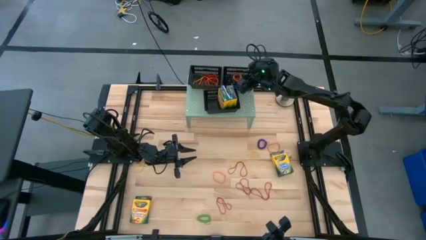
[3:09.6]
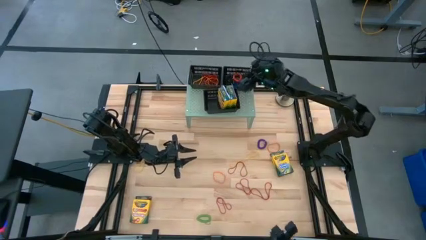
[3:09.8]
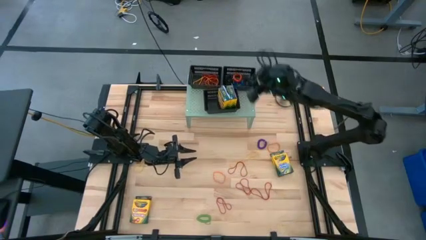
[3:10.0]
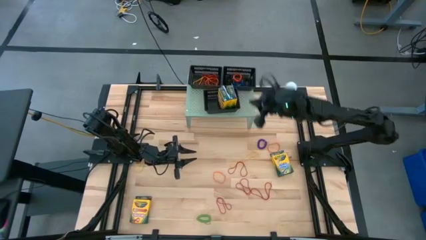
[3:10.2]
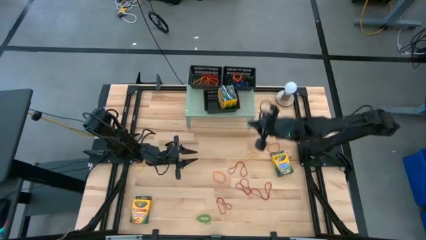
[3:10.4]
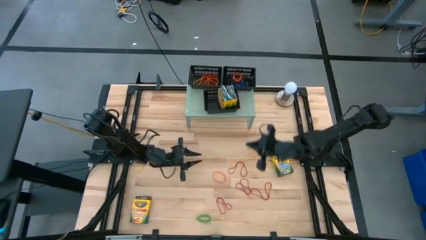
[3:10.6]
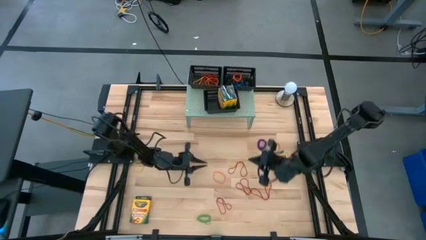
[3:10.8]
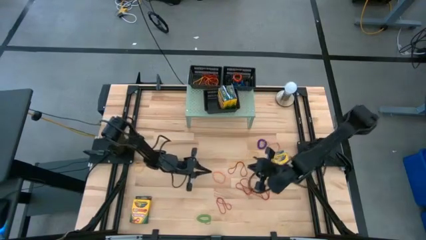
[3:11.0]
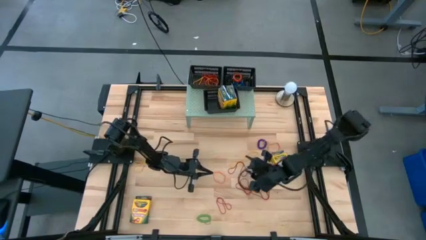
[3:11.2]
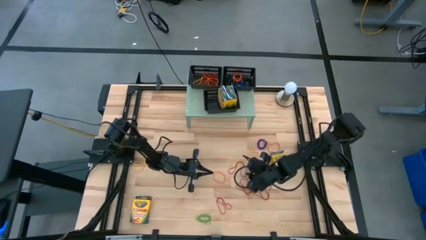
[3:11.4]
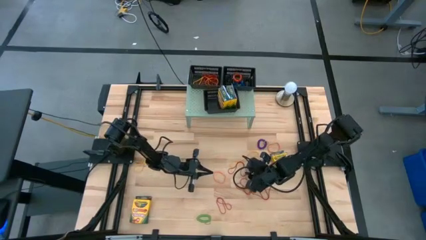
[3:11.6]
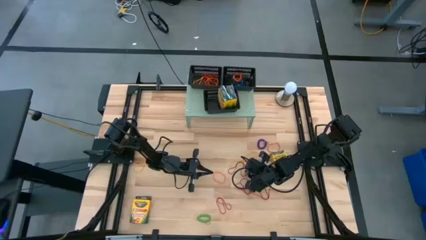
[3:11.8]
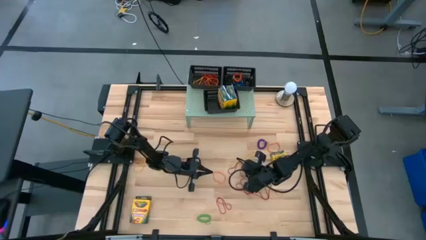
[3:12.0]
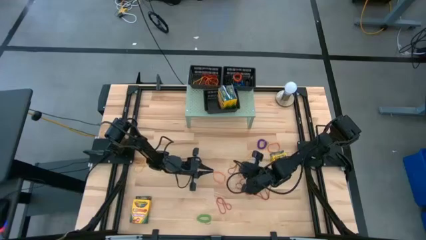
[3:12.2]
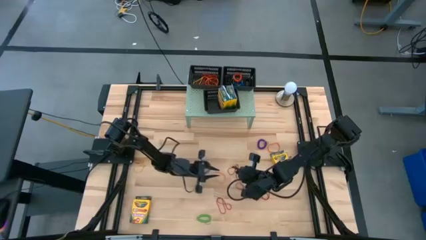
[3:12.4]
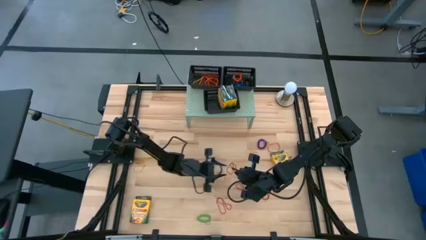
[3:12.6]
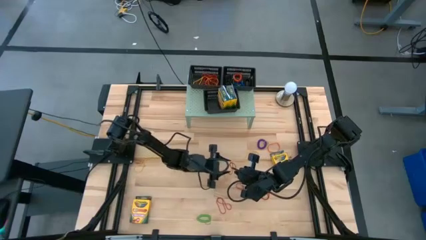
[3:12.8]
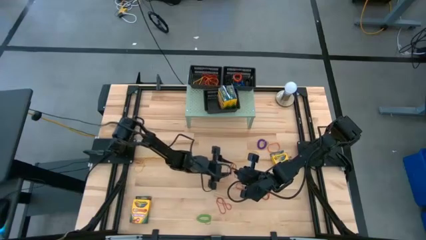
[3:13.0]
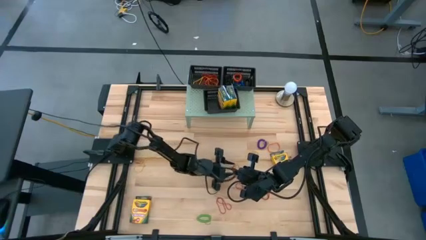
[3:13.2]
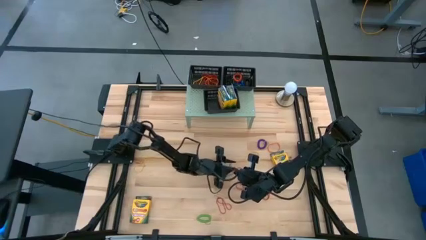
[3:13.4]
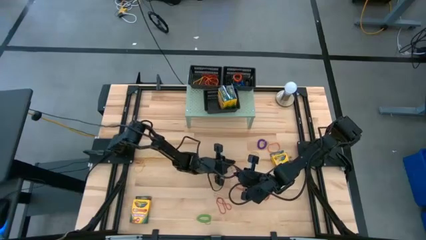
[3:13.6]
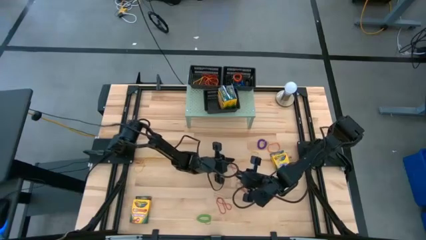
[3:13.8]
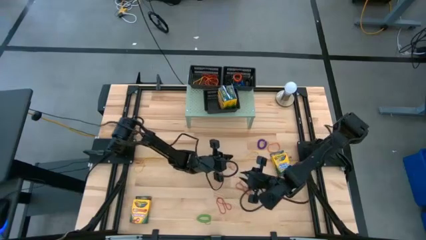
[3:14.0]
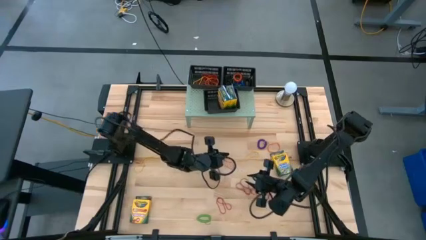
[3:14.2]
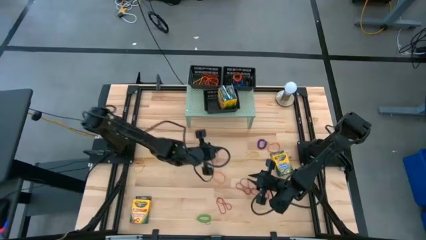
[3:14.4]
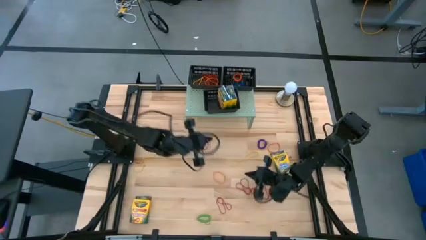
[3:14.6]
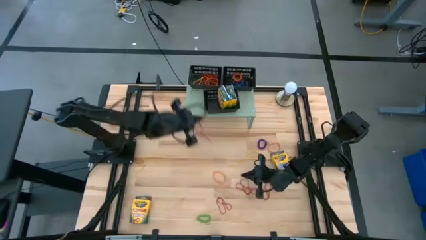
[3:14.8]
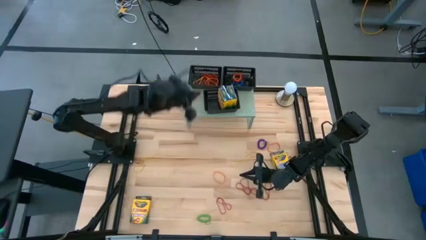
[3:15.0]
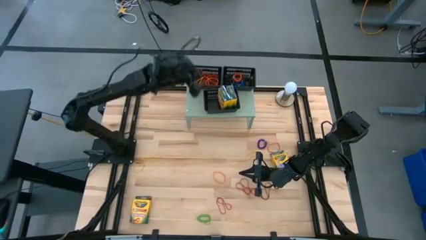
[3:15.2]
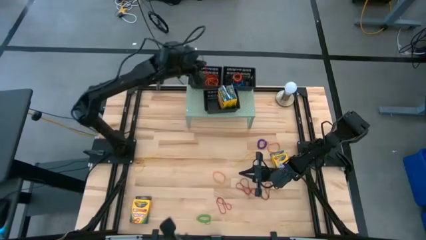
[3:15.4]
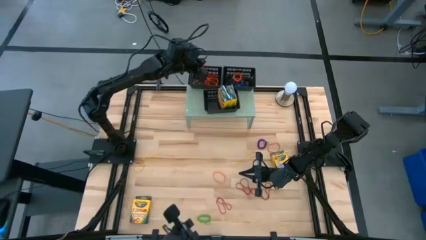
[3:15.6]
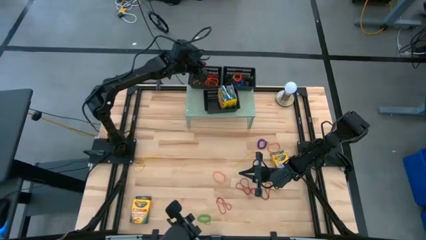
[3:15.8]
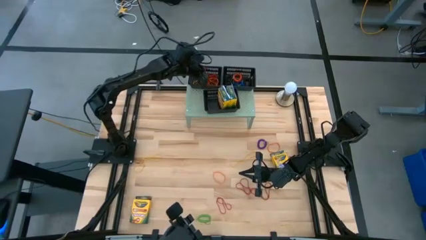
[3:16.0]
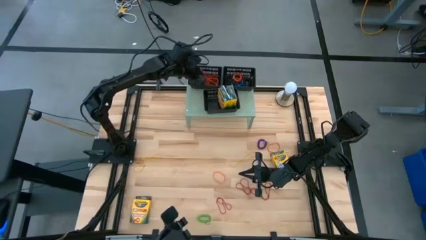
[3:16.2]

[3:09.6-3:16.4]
Task: Pick & Place Office Desk Supplies
Put the red rubberband into the top left black bin

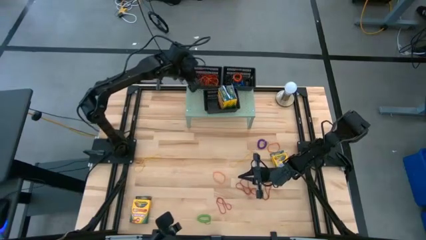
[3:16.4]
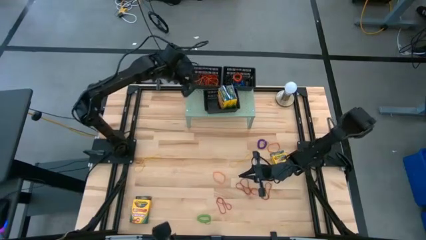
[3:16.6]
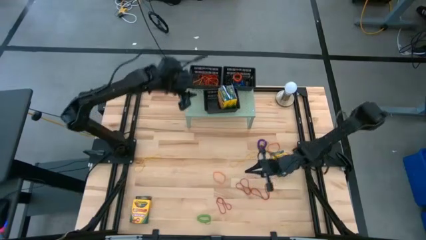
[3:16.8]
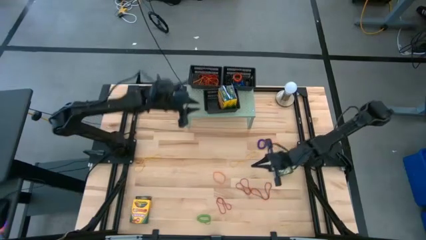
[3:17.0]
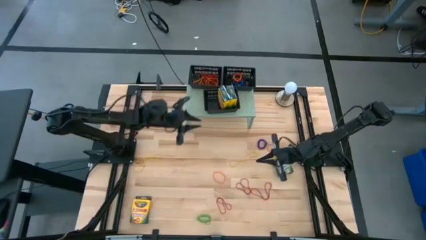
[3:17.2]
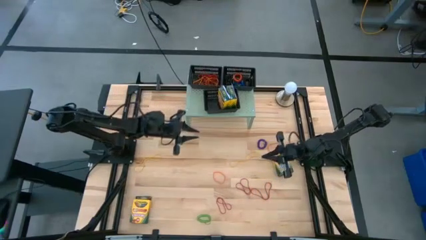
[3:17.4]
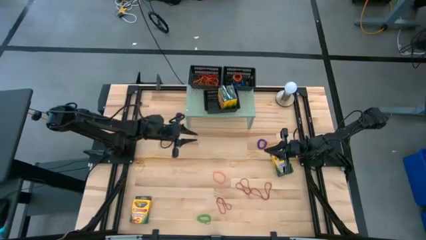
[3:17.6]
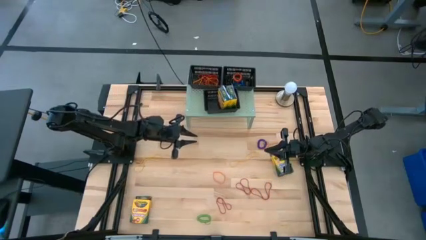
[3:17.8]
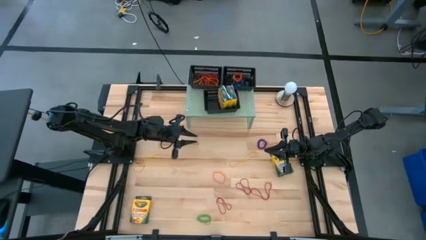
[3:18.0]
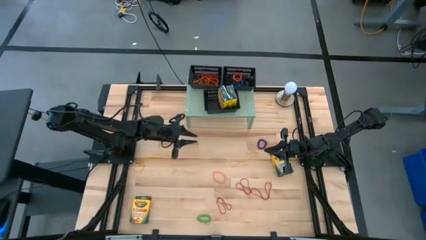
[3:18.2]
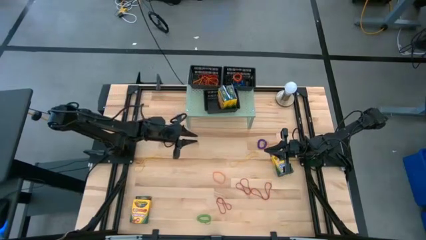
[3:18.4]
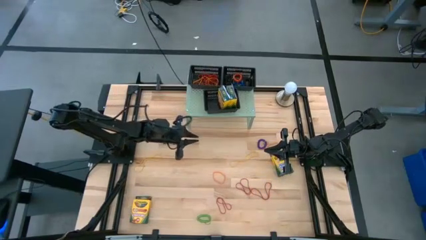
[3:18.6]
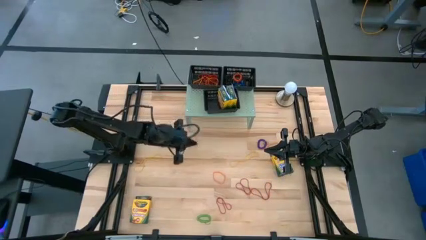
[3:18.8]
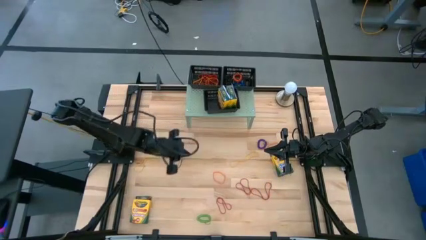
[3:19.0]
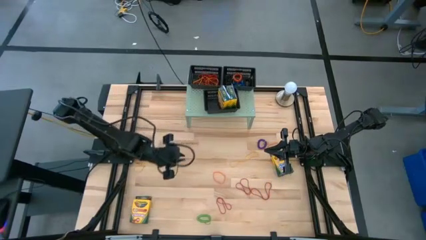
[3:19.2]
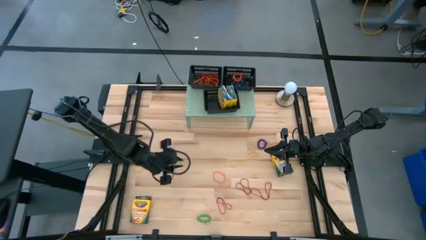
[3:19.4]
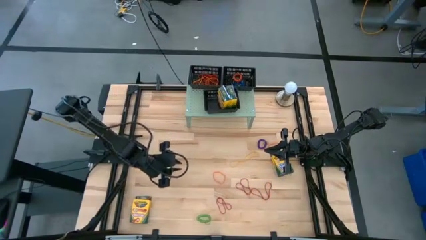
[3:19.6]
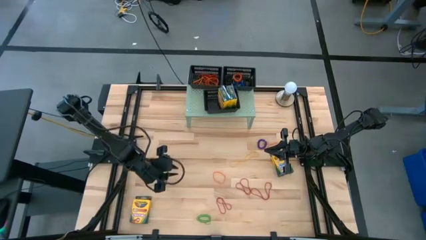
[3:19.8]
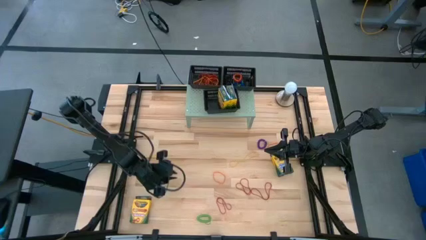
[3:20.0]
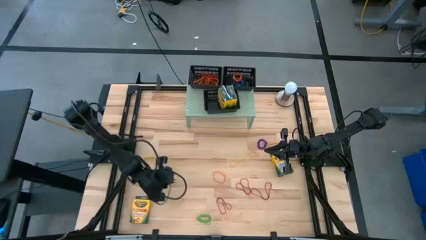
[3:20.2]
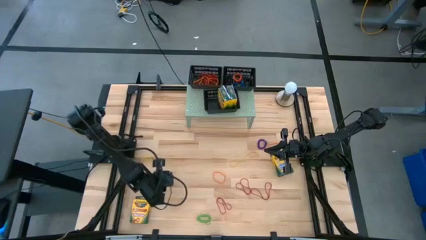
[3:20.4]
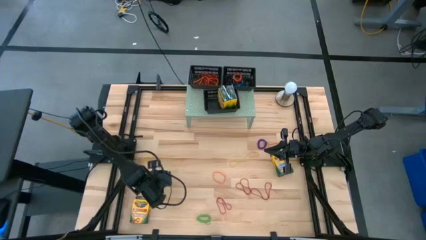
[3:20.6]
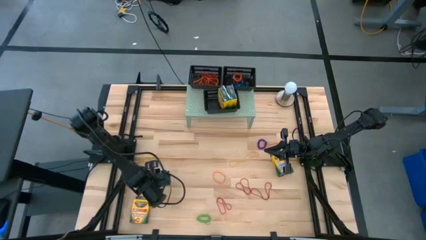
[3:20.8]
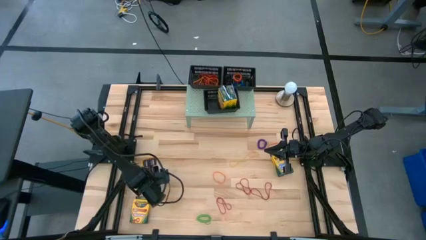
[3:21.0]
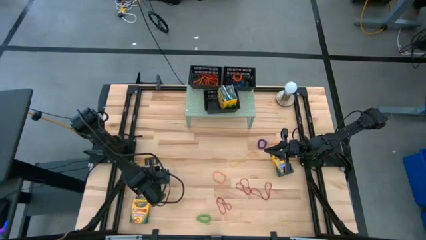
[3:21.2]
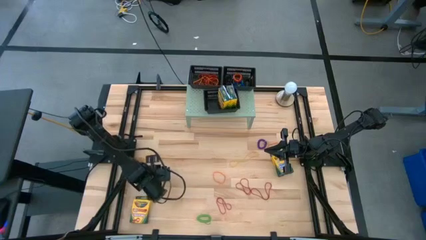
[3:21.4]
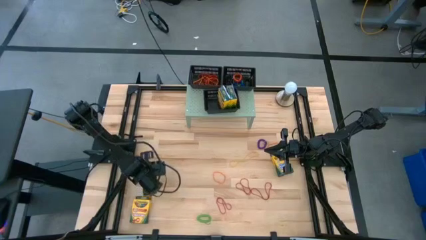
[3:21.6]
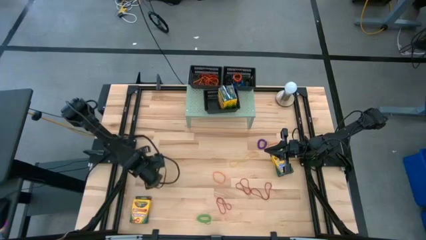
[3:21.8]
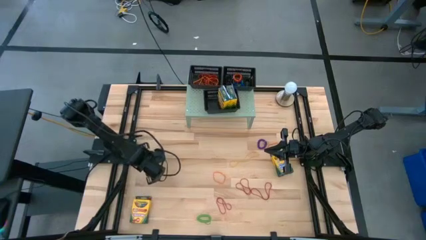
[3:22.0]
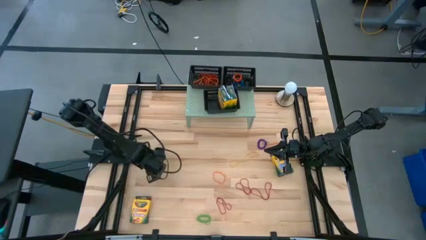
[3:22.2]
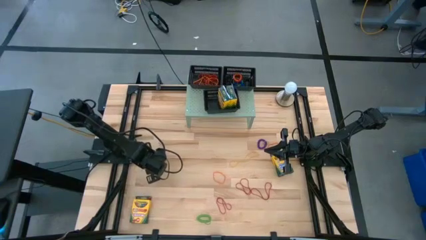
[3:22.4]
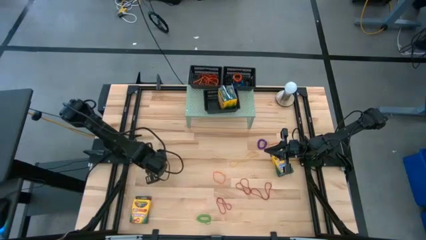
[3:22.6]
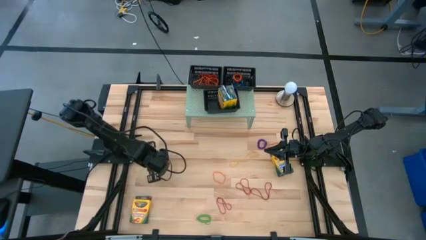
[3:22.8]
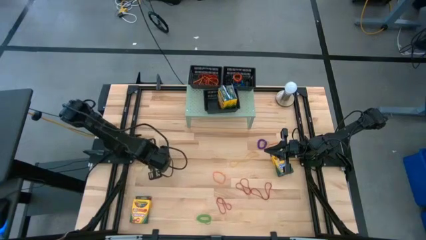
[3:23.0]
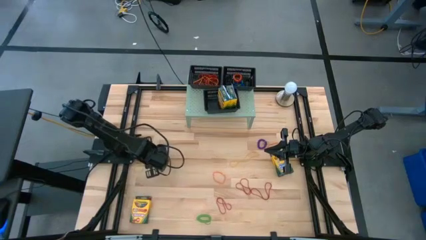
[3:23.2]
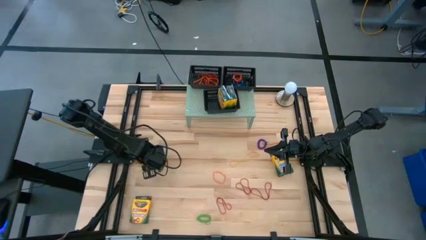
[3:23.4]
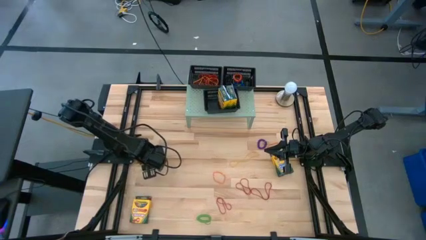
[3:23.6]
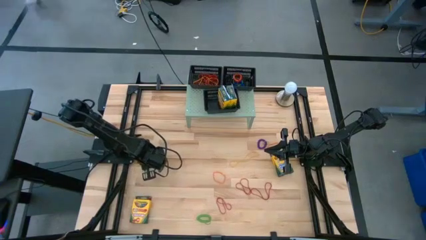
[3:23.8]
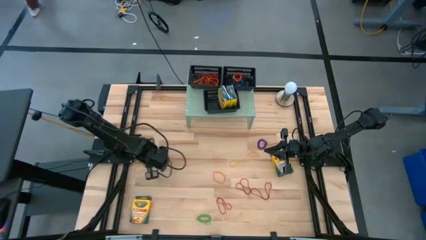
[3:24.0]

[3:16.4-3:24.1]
Put the yellow rubberband into the top left black bin
